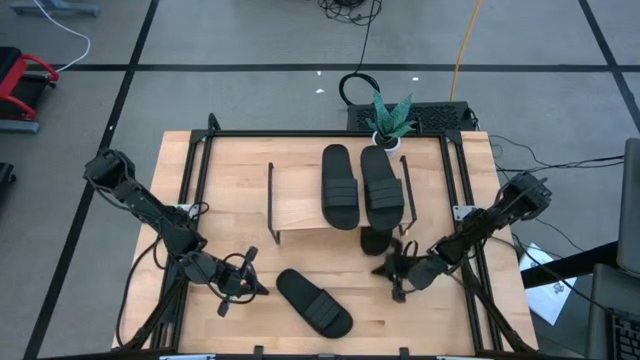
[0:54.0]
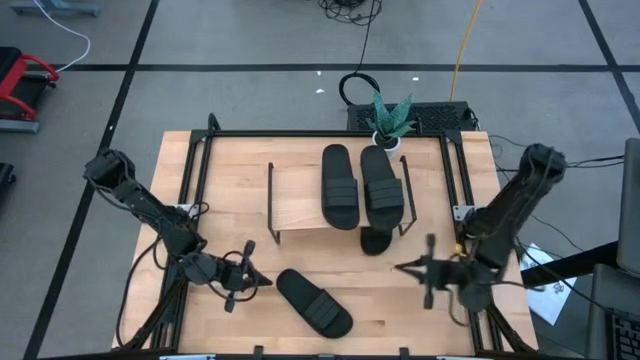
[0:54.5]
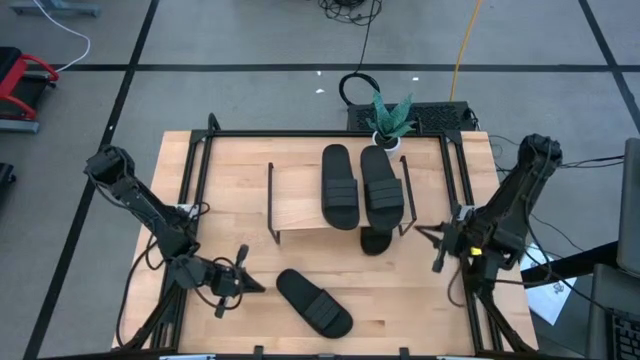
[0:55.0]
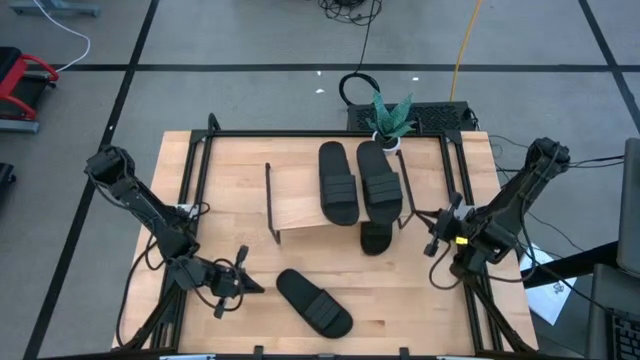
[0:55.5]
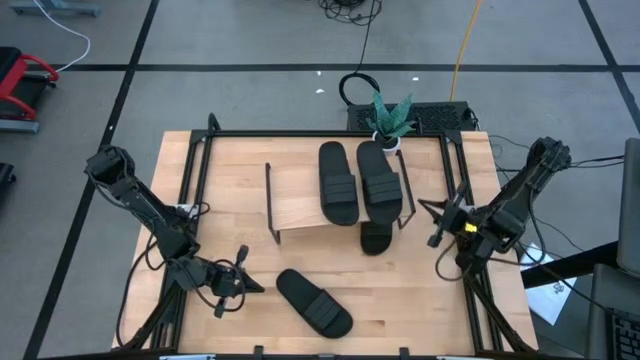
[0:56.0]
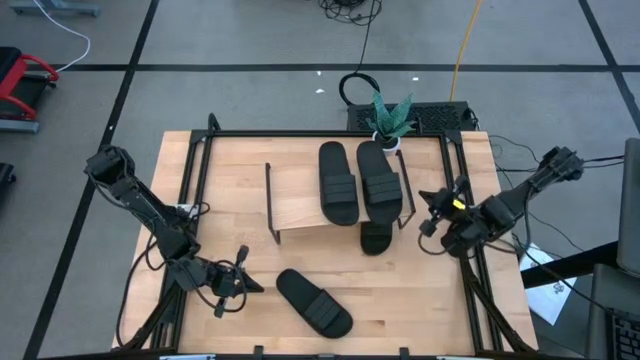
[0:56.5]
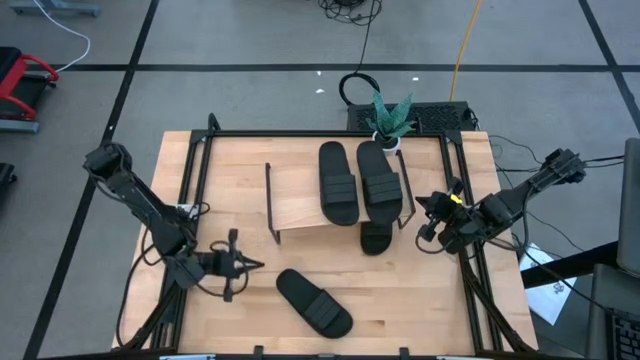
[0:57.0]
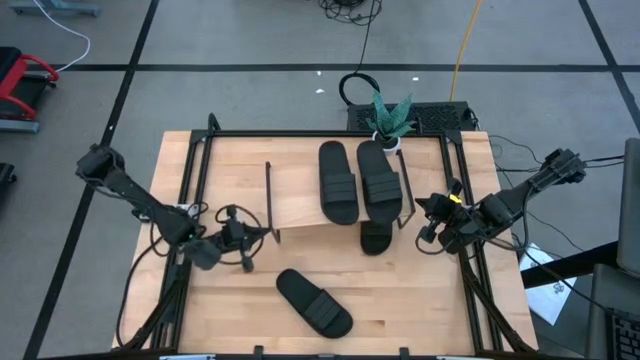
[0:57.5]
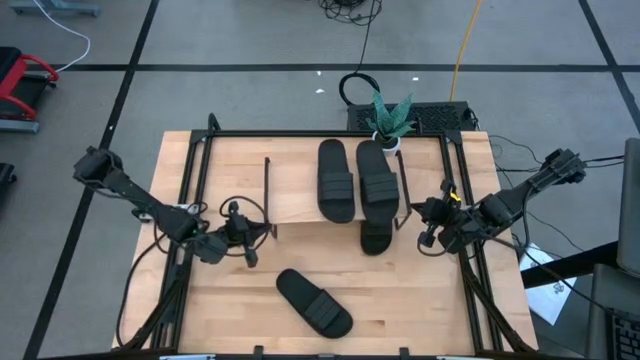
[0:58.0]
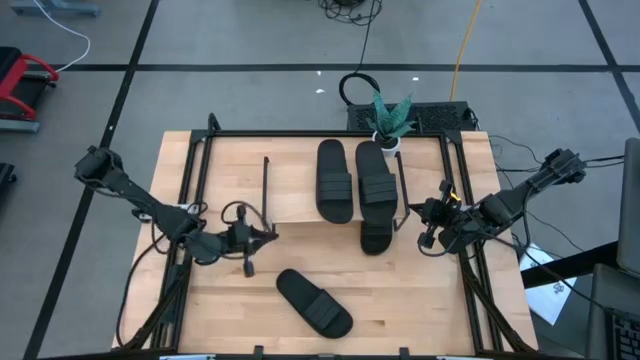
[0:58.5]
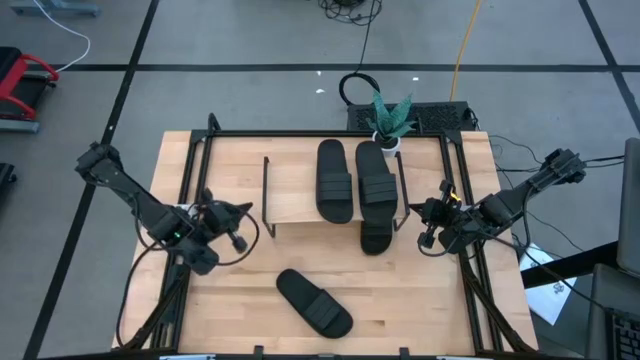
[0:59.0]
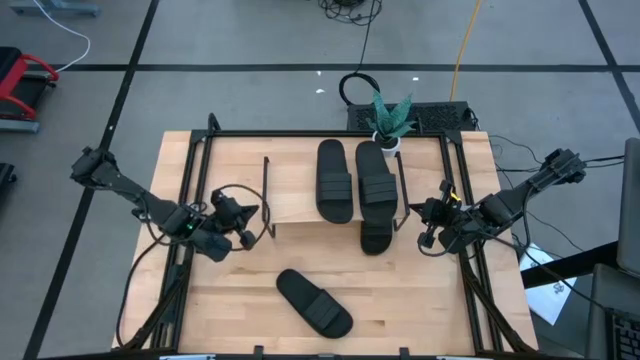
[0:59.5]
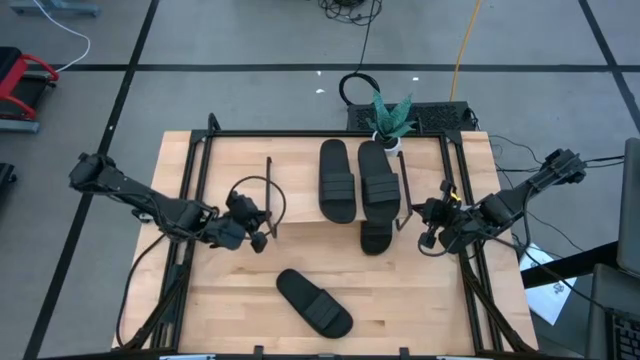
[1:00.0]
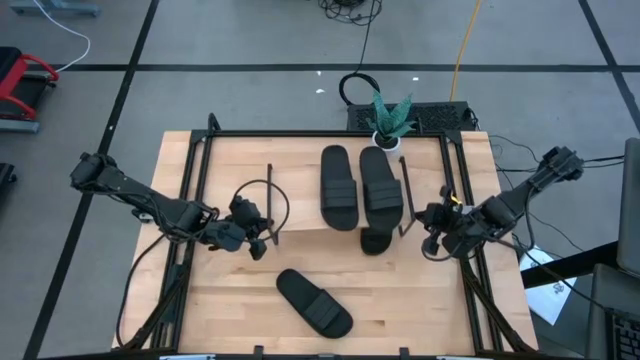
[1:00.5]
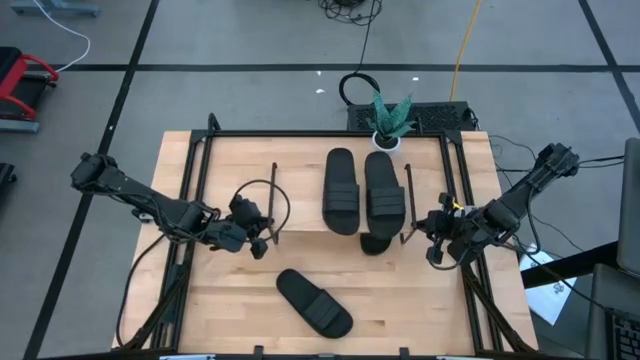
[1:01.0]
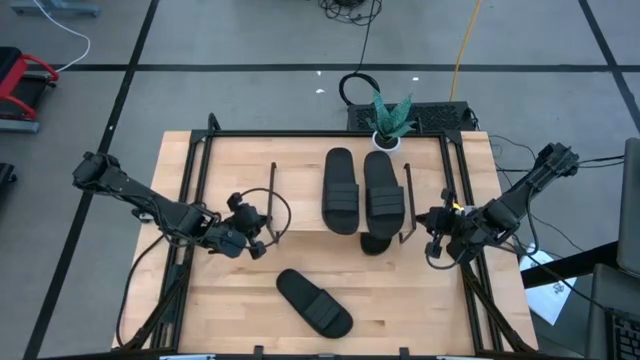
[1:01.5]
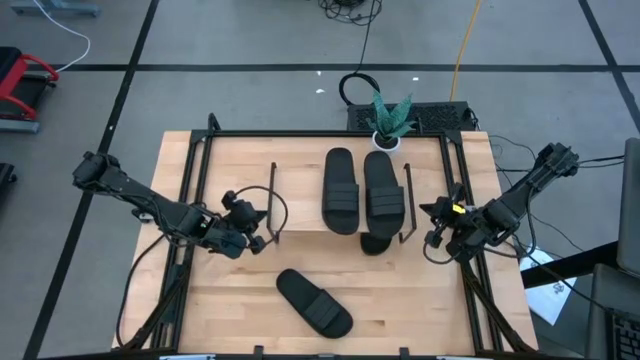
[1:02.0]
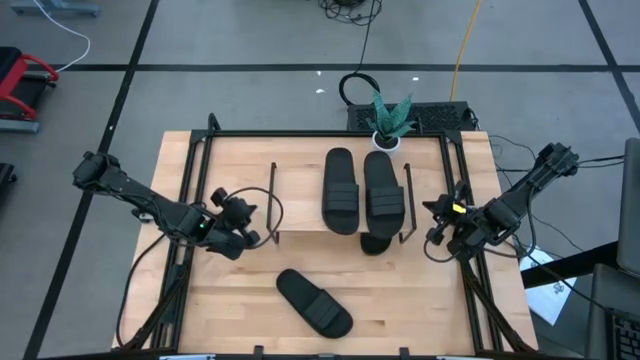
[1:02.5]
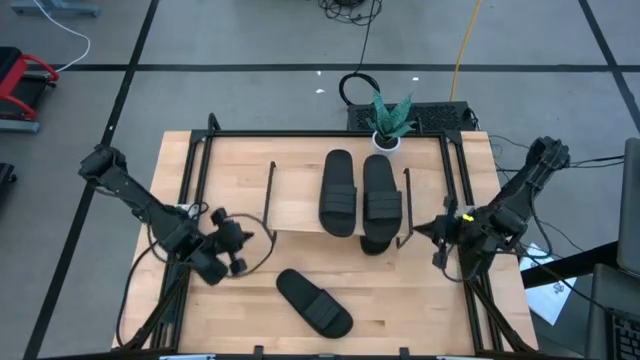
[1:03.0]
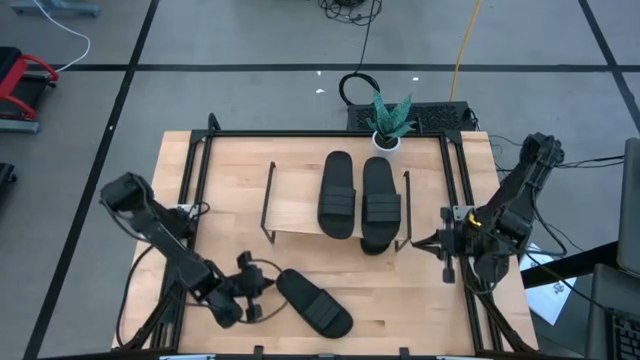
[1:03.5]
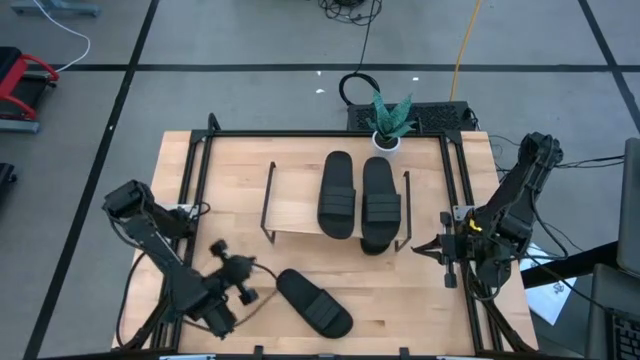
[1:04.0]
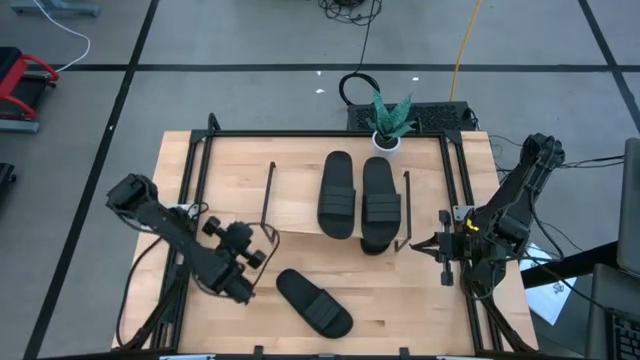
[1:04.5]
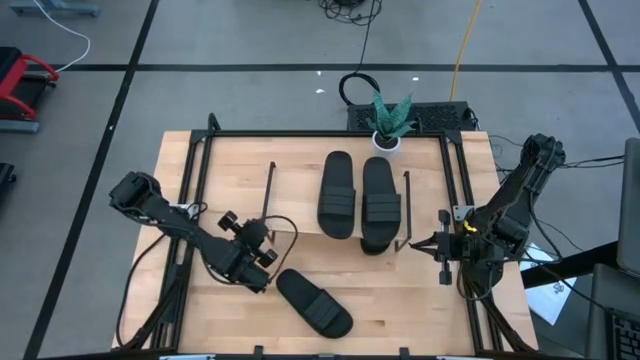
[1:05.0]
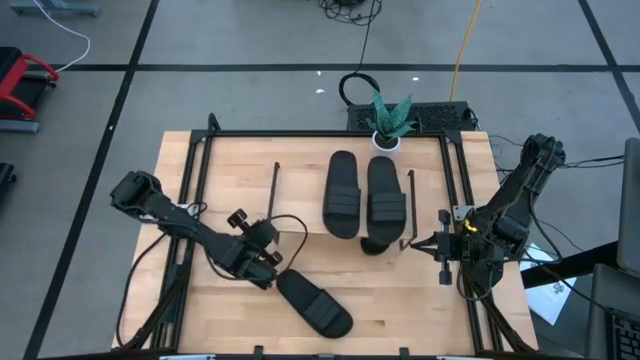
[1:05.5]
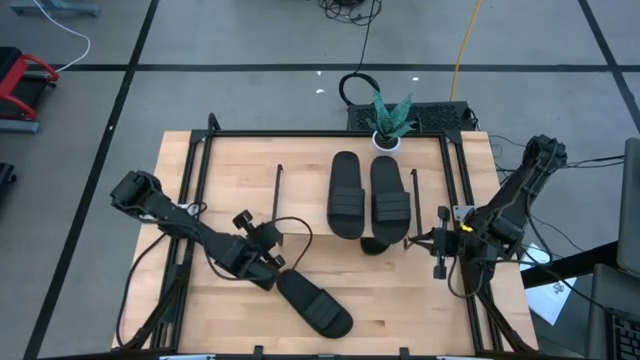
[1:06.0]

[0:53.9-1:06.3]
Task: Pick and place slides into the shelf
Adjust the shelf

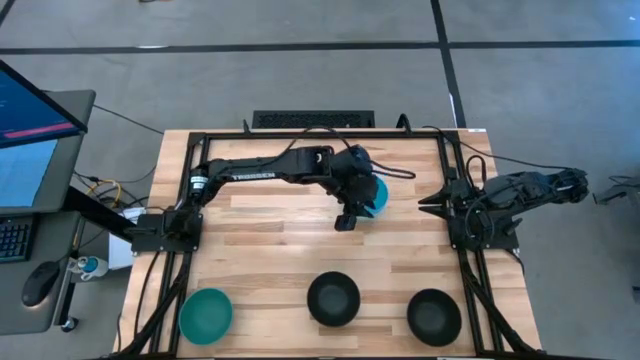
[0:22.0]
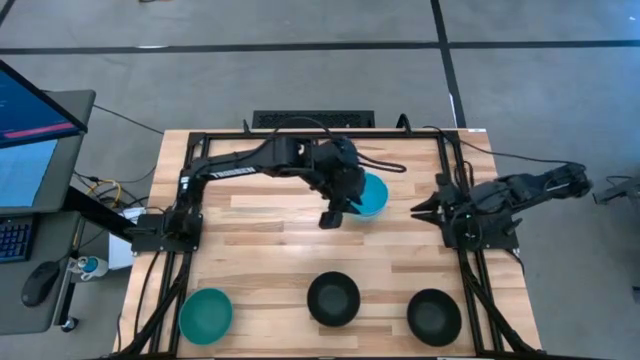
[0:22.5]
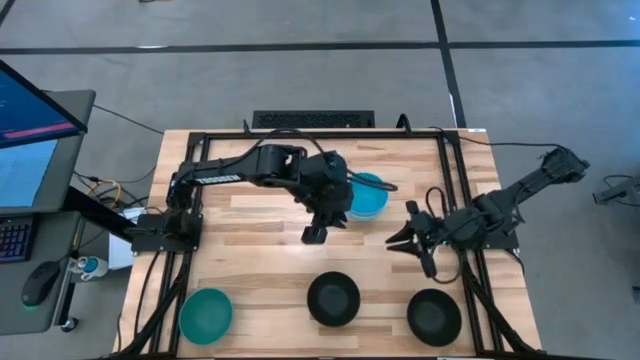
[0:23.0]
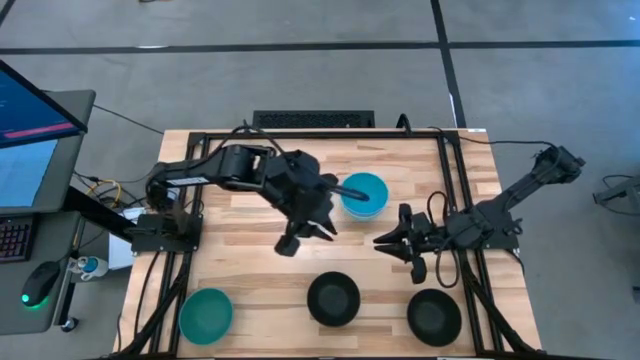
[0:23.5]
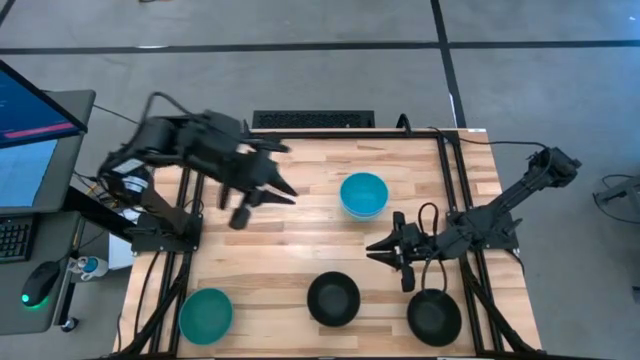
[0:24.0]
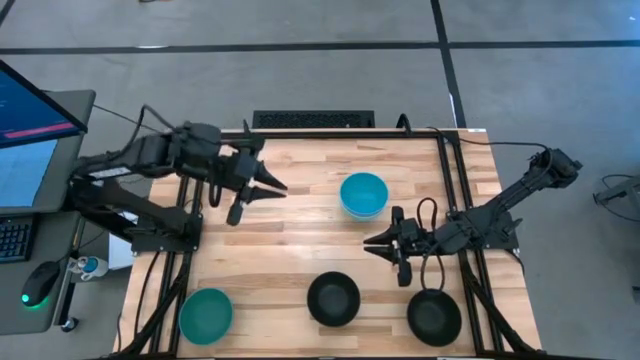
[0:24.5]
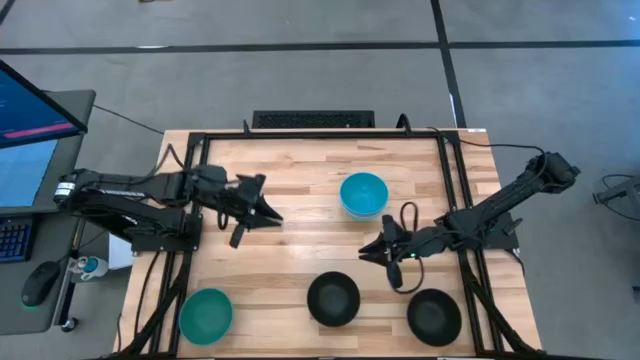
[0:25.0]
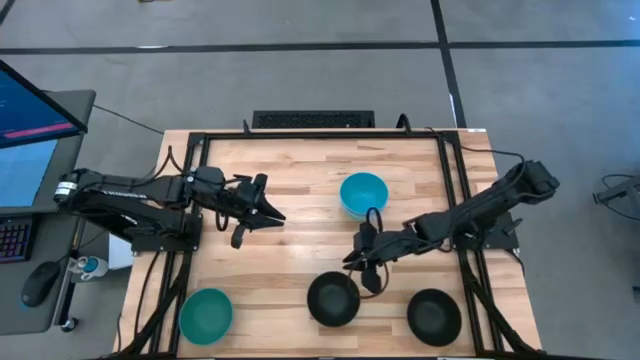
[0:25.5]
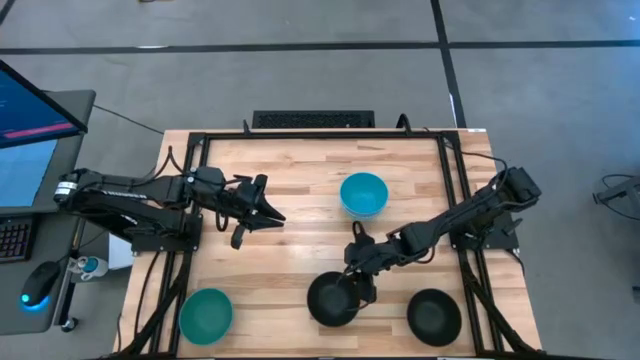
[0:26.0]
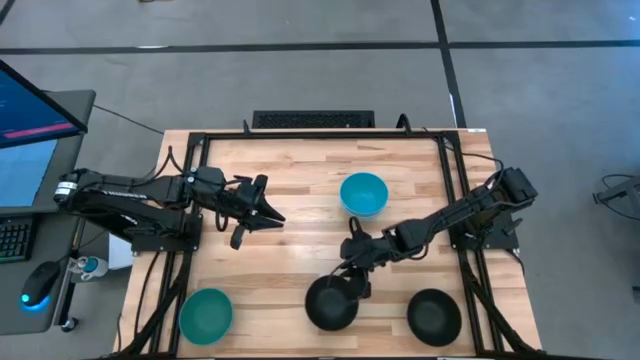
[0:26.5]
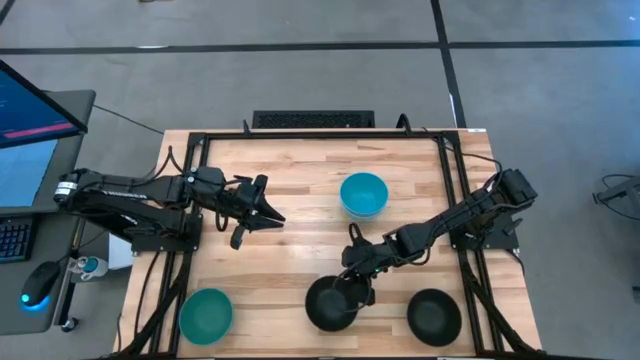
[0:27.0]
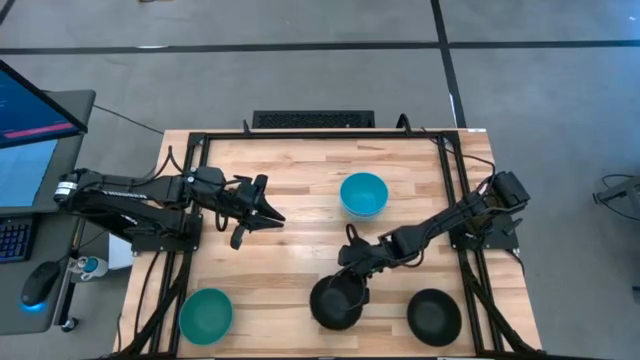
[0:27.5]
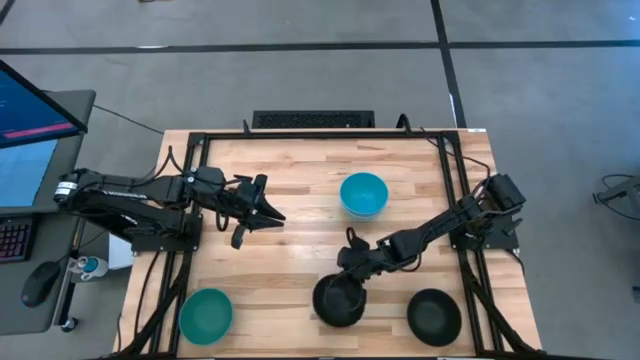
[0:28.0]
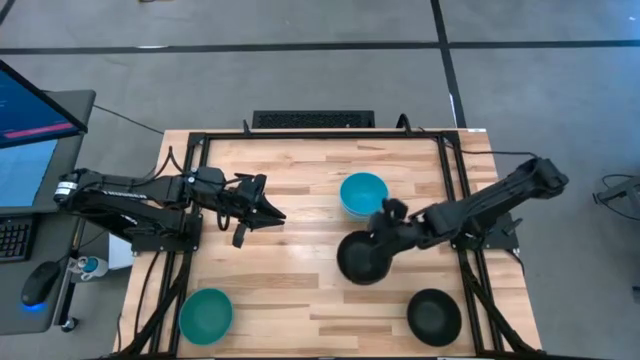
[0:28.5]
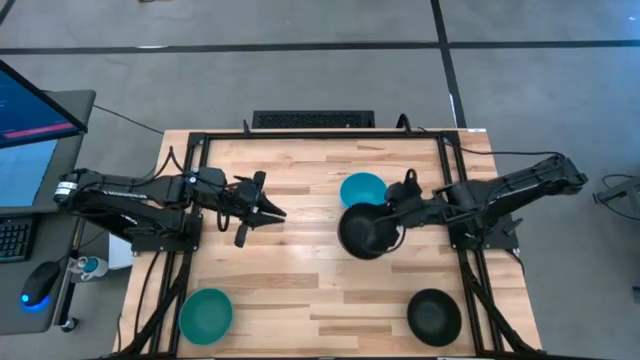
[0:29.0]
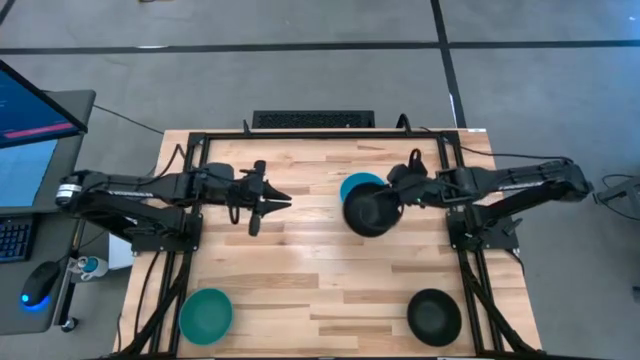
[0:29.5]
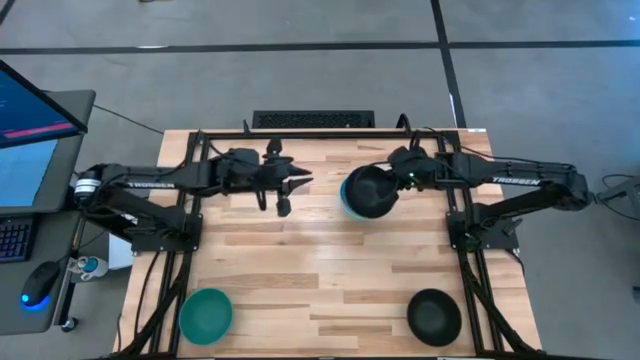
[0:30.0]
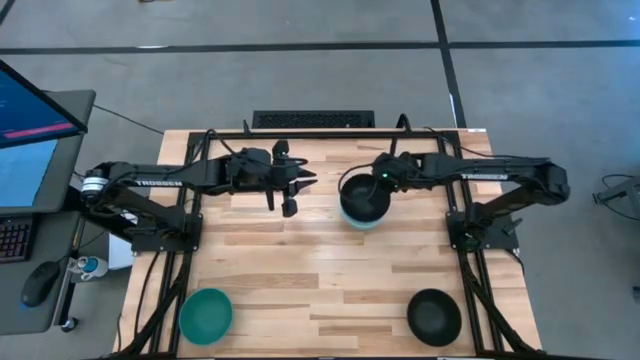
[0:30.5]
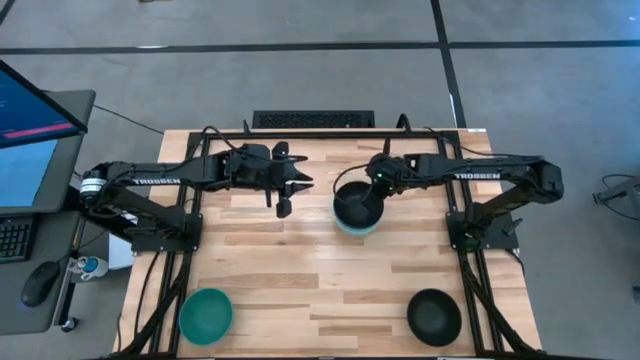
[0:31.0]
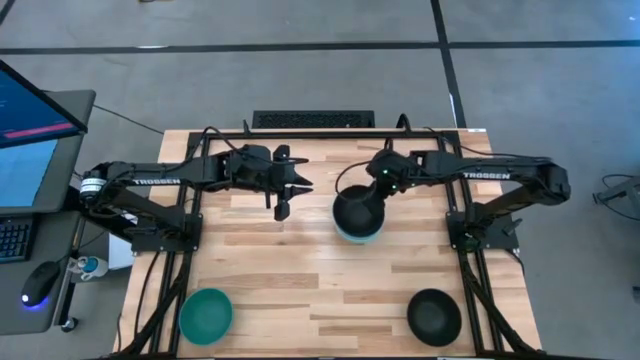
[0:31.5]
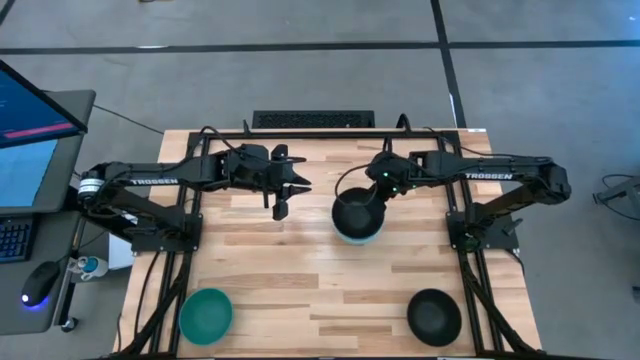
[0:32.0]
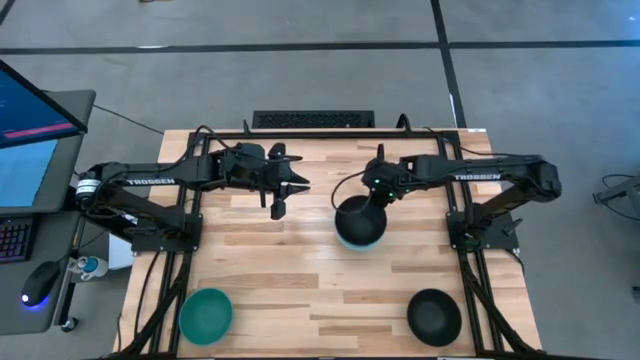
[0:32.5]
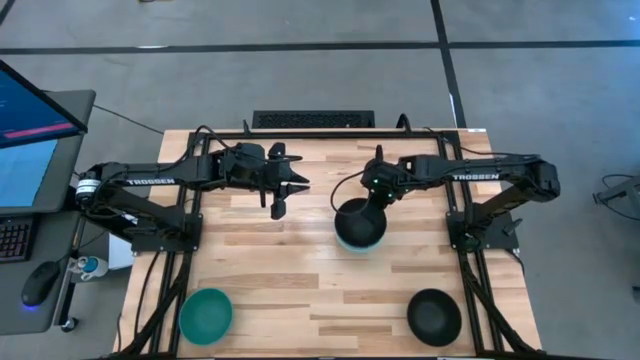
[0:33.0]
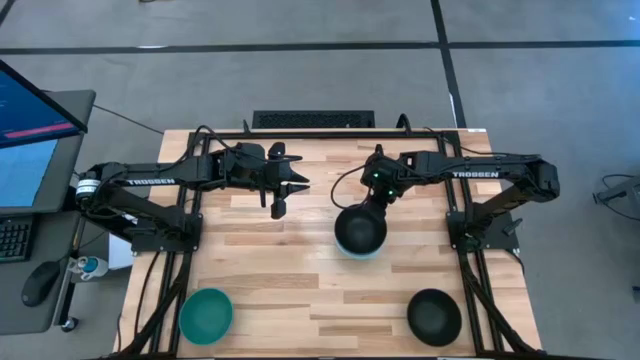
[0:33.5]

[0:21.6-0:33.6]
Task: Nest bowls inside each other
Stack the left black bowl on top of the blue bowl
